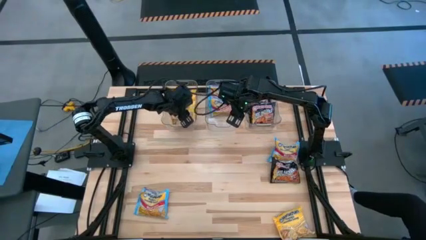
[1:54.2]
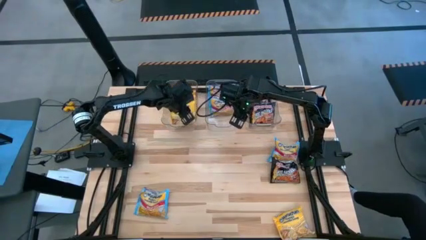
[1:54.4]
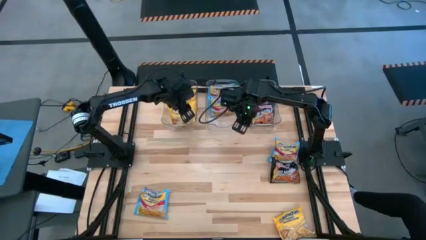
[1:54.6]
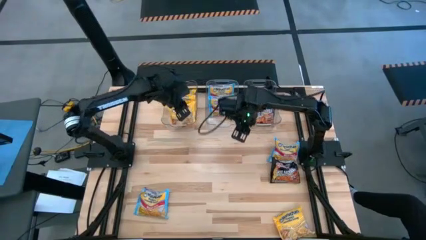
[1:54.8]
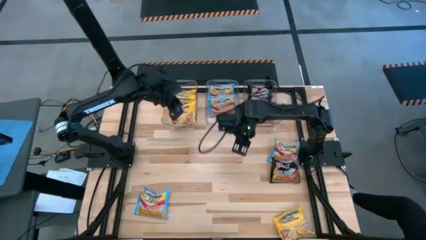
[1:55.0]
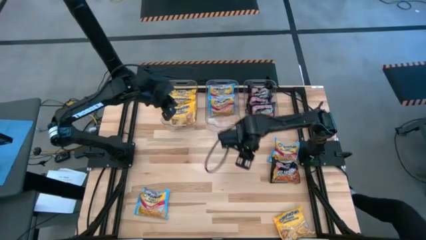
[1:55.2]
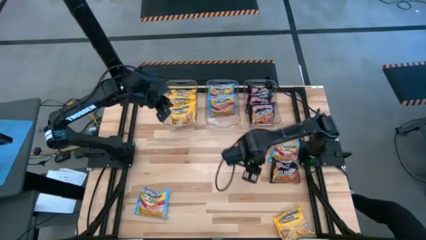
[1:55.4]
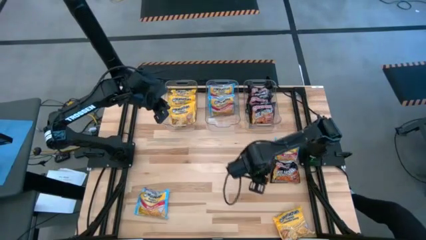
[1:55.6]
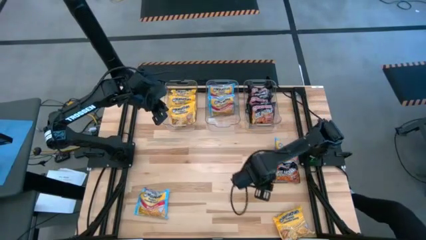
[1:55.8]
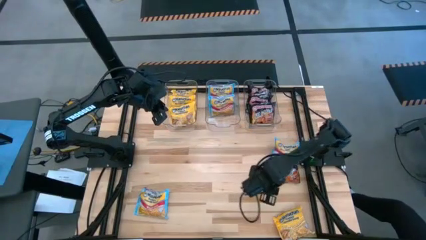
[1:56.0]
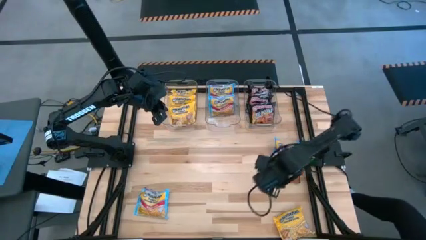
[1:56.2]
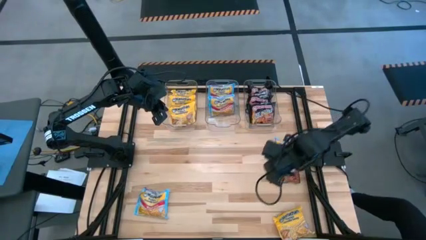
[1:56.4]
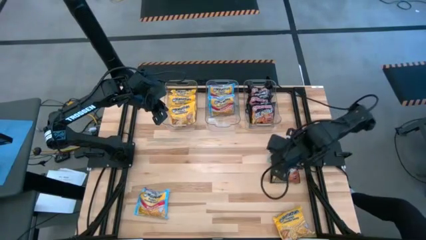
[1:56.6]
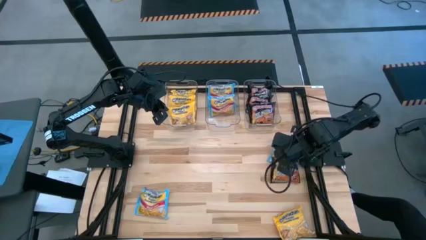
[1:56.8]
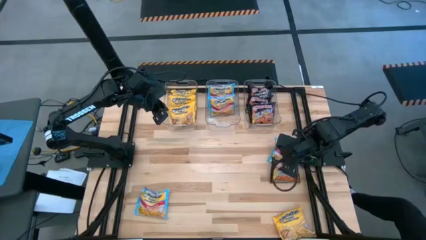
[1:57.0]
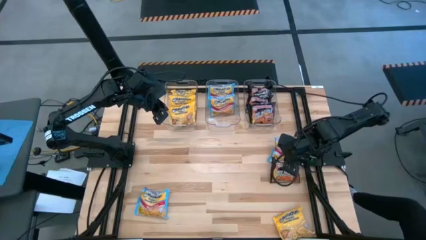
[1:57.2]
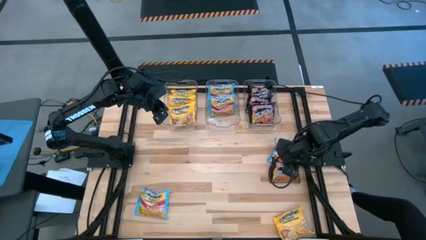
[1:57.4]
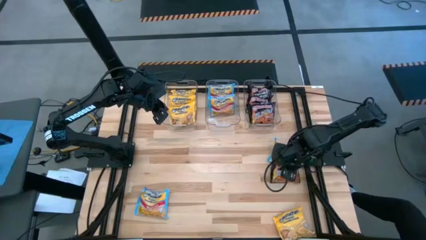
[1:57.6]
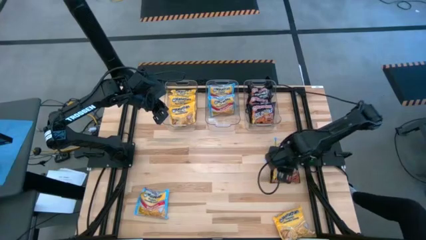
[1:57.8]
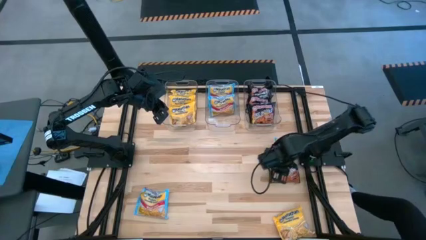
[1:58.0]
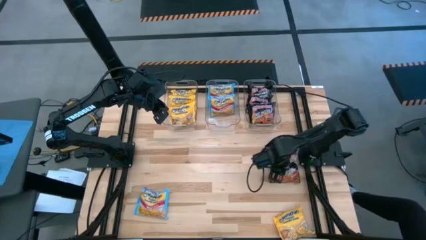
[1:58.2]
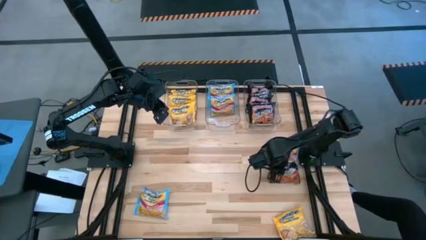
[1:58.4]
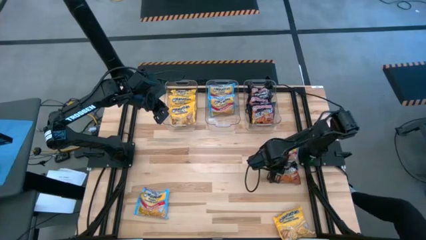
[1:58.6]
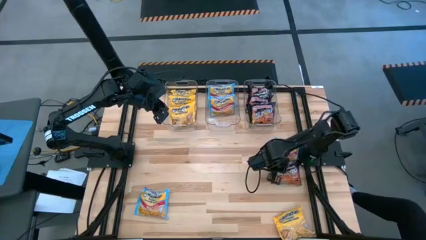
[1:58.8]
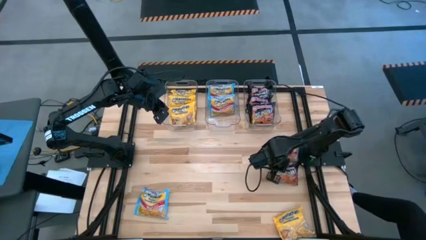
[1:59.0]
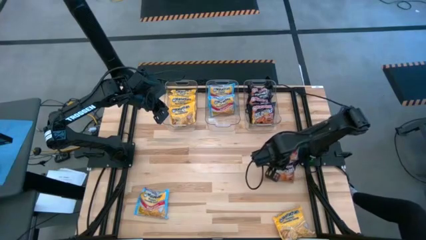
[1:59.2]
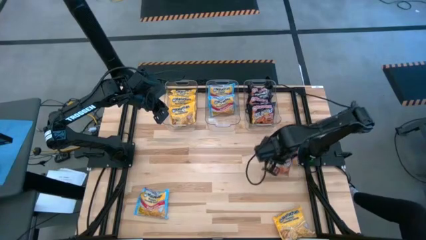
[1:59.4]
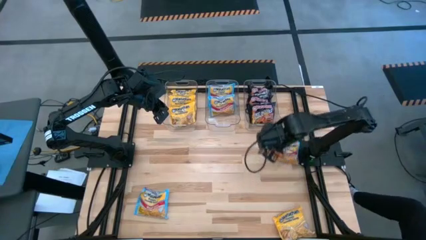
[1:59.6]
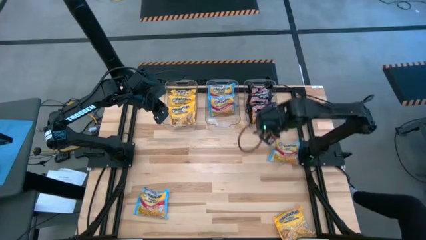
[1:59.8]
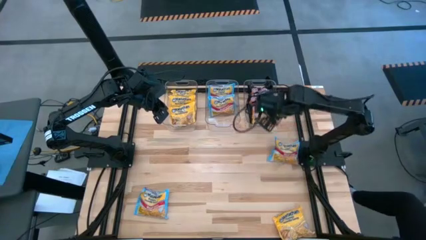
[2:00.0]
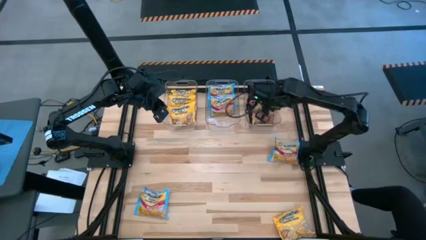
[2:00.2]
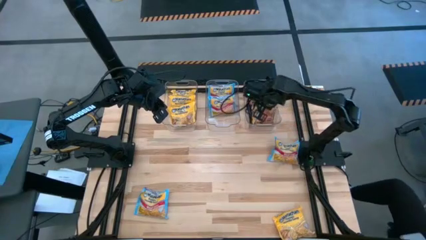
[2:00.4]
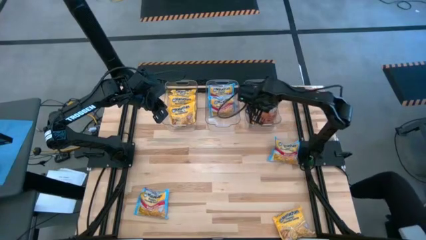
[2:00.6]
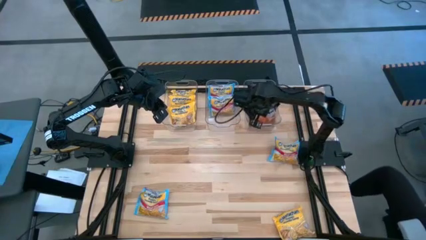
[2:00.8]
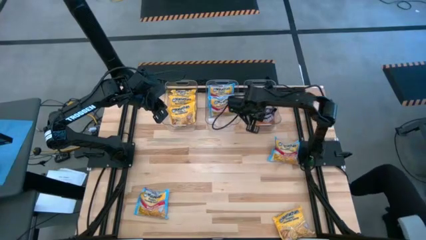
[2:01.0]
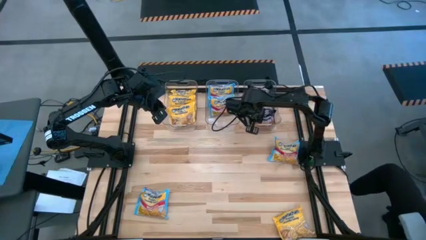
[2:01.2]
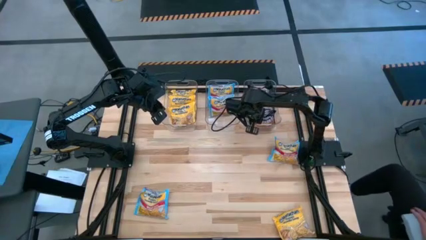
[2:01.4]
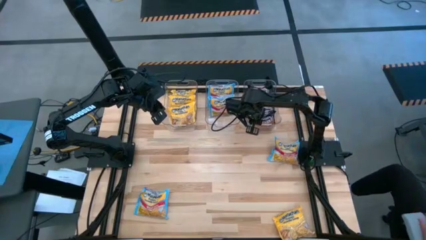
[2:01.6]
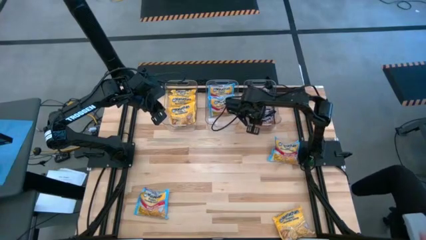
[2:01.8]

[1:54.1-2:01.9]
Task: Sort Maruchan noodles
Put the black noodle pack into the right transparent bin

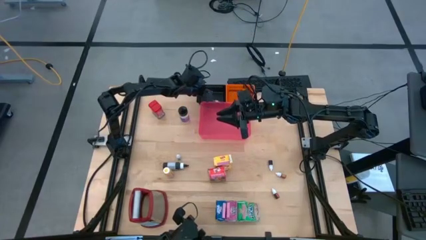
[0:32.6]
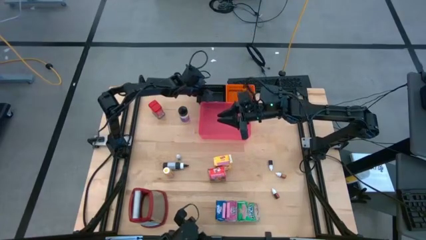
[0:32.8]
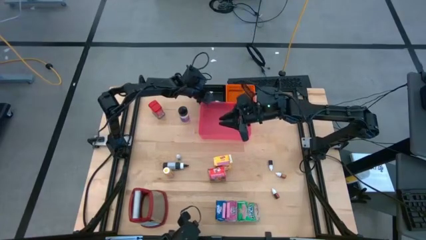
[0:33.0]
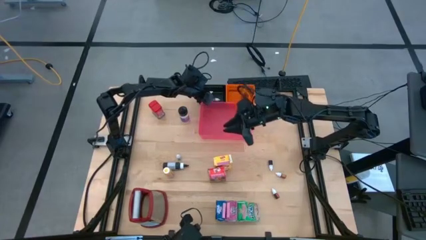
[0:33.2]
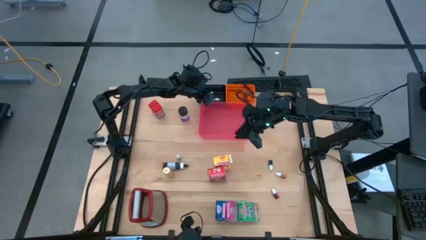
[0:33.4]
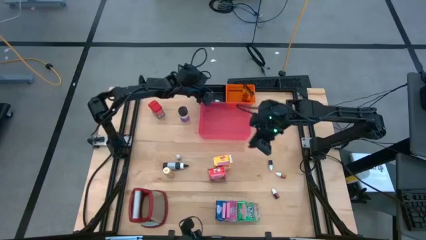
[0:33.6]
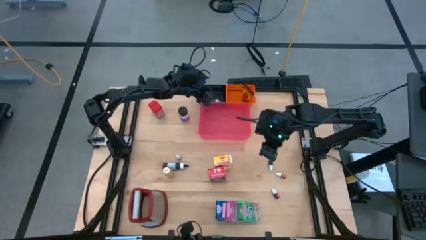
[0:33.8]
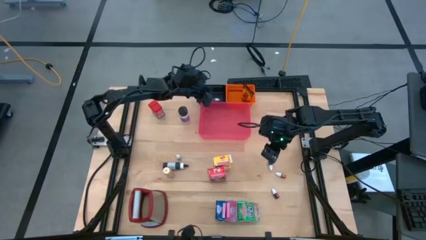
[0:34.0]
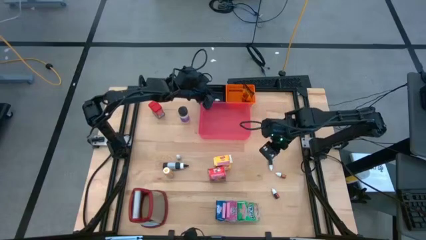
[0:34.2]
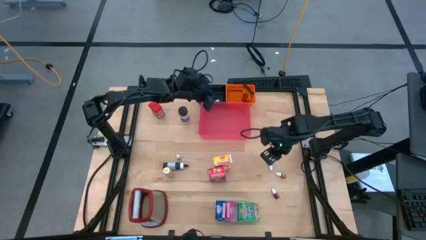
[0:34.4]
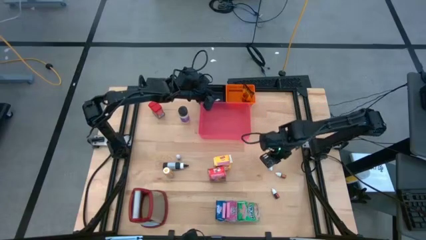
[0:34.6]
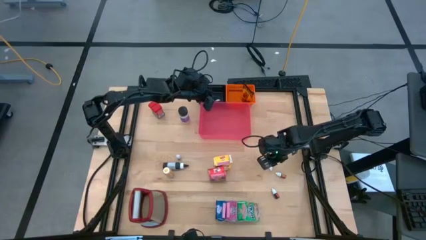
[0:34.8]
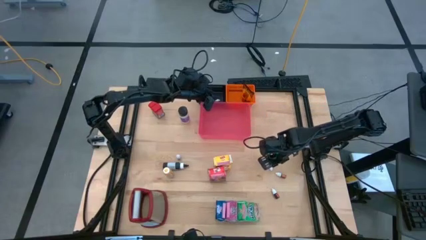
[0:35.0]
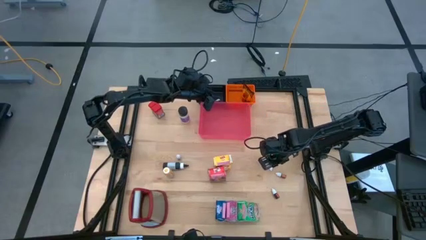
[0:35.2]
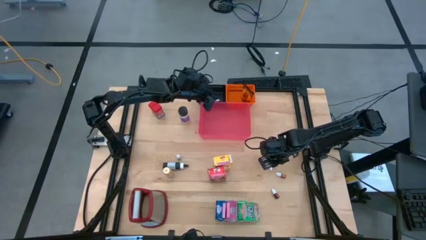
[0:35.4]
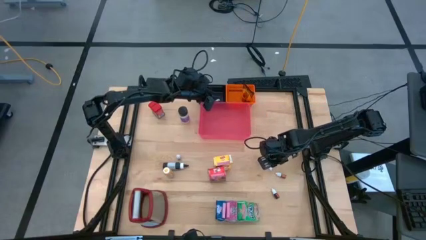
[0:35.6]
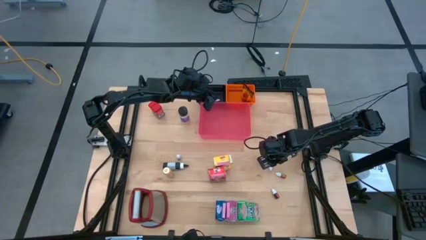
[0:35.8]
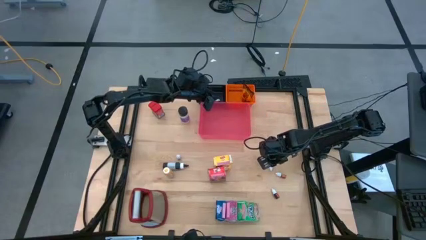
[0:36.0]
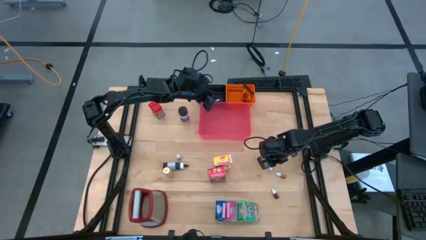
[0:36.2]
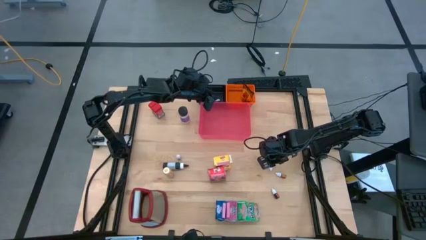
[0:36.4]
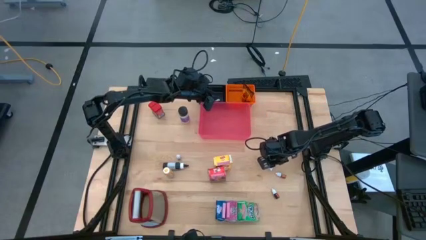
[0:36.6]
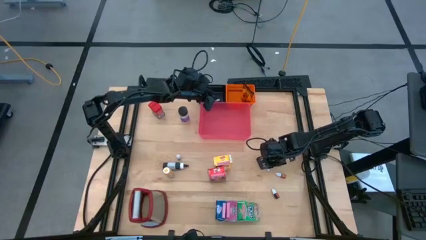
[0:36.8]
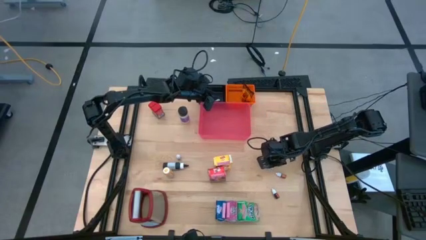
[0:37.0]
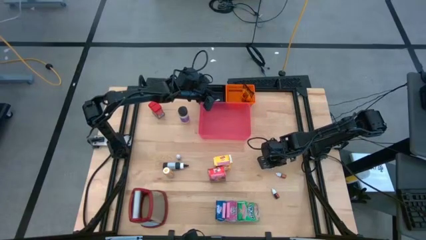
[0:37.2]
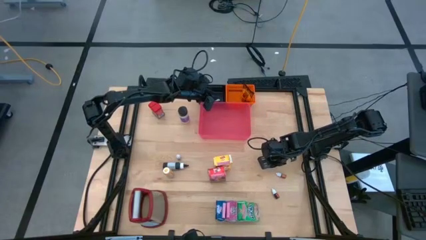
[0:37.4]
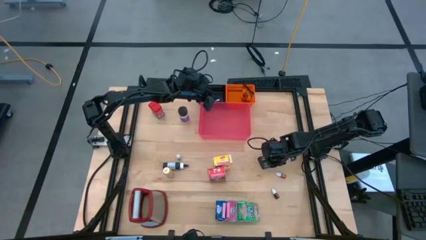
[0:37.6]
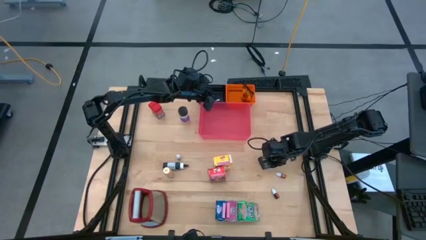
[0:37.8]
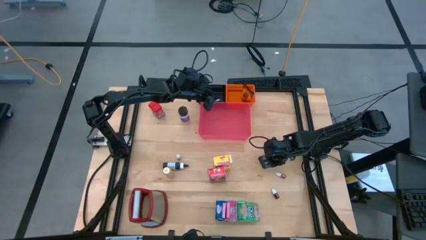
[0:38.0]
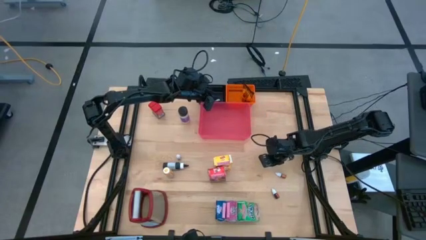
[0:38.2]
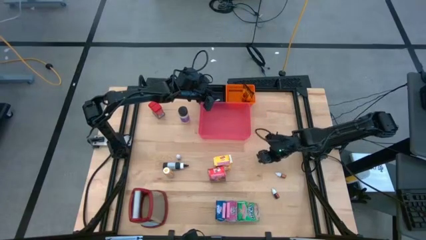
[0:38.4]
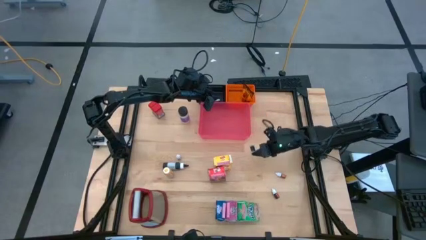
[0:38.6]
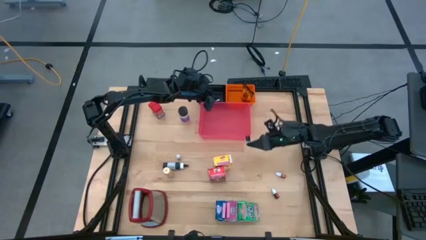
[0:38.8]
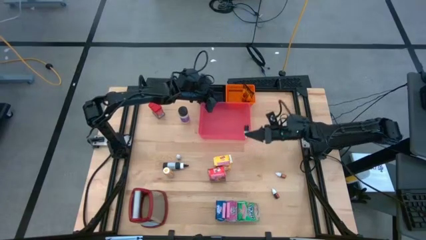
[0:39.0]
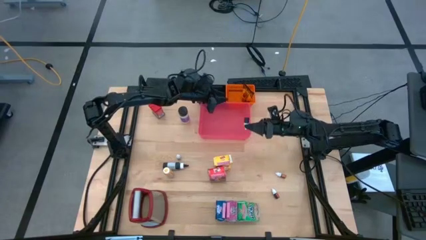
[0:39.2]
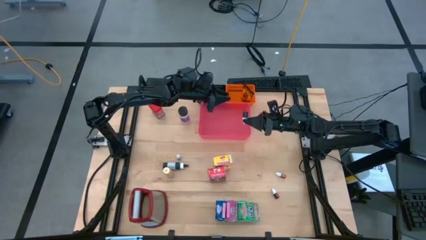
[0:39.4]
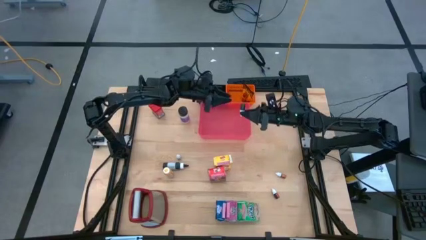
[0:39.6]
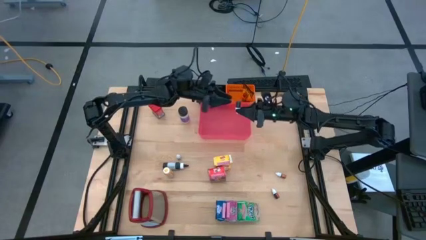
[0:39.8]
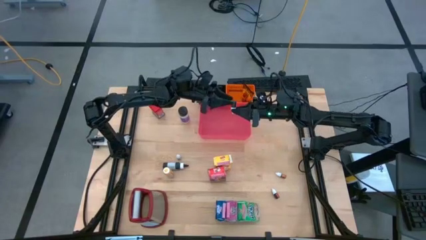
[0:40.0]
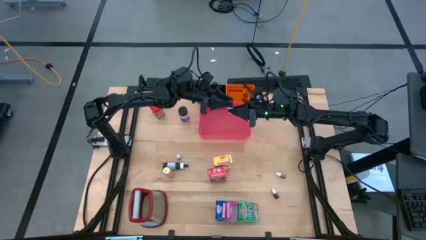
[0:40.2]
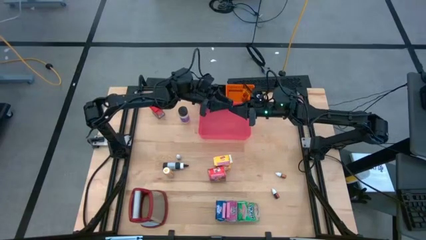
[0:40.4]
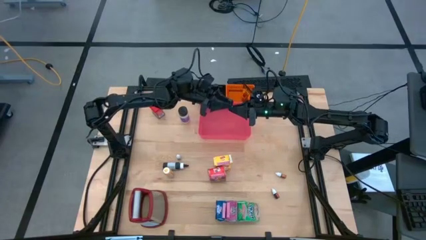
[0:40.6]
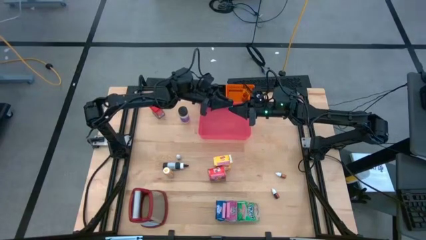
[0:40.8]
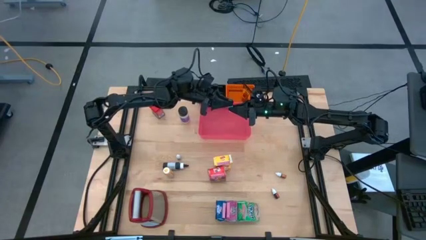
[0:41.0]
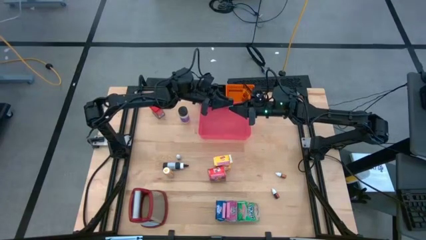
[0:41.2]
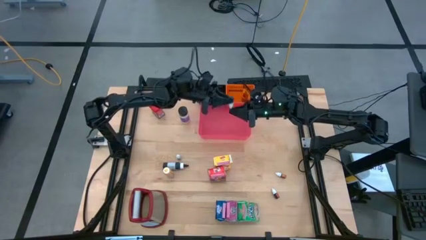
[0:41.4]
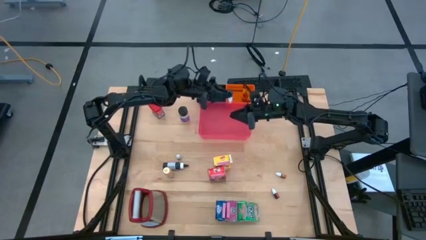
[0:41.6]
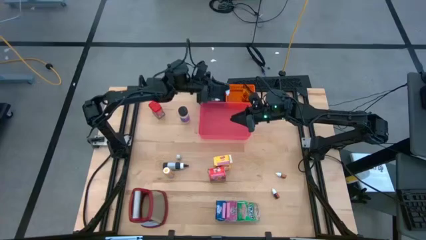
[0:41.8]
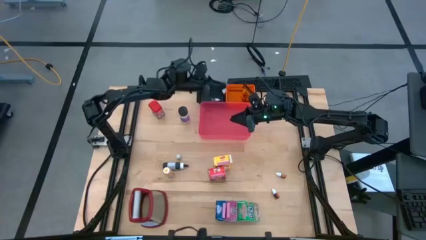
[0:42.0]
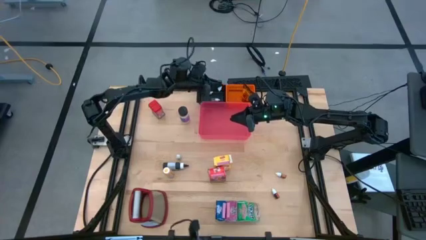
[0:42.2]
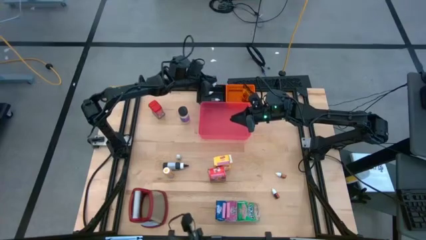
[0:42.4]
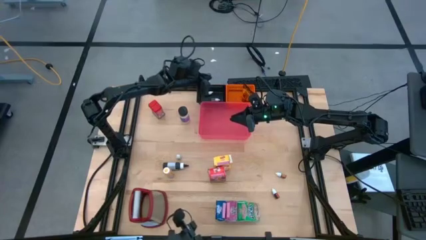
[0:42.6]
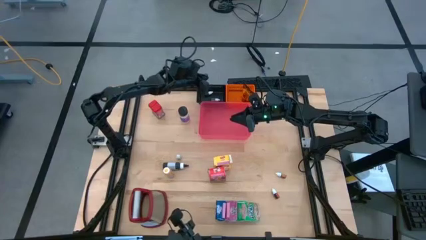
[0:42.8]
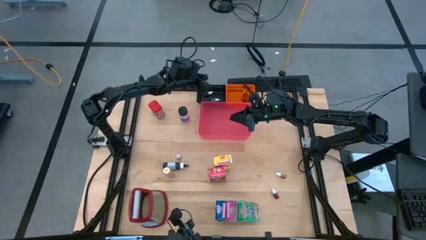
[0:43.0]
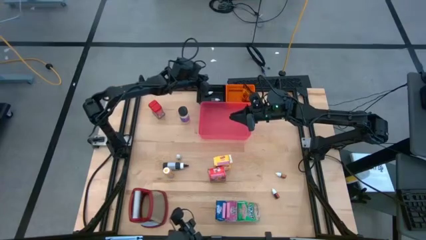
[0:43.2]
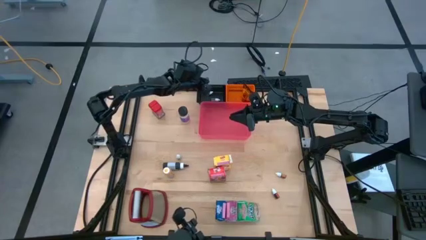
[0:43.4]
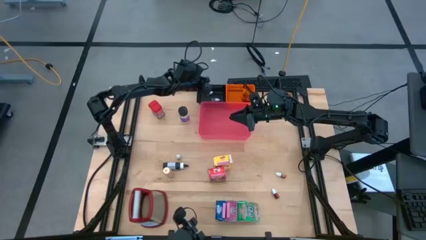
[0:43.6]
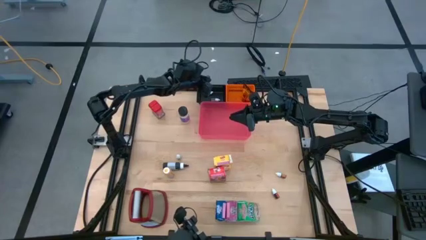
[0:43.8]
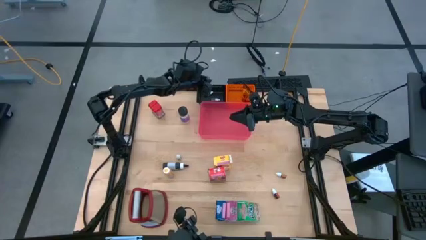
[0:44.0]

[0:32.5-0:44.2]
Task: Pick & Place Kitchen Items
Put the small purple food coloring bottle into the black bin
